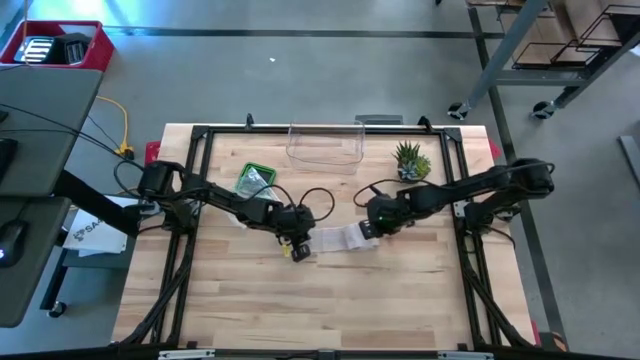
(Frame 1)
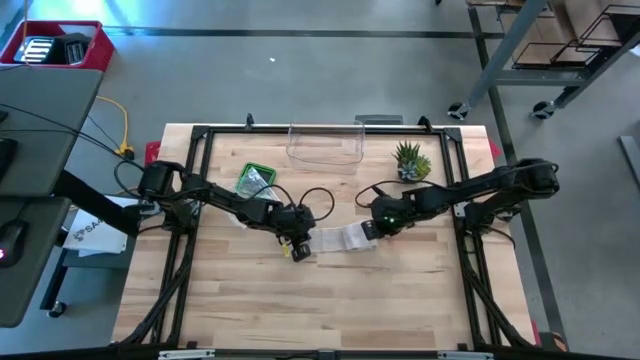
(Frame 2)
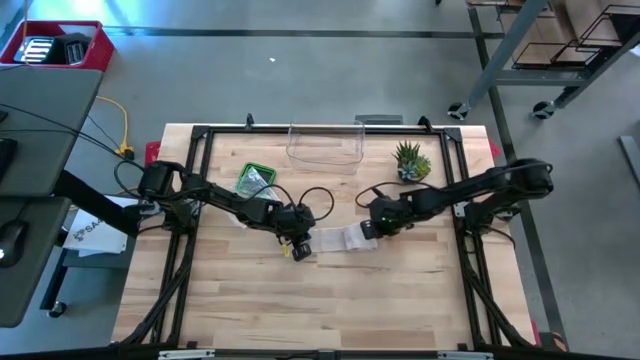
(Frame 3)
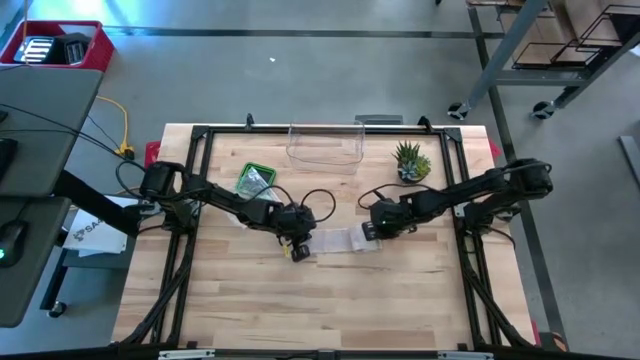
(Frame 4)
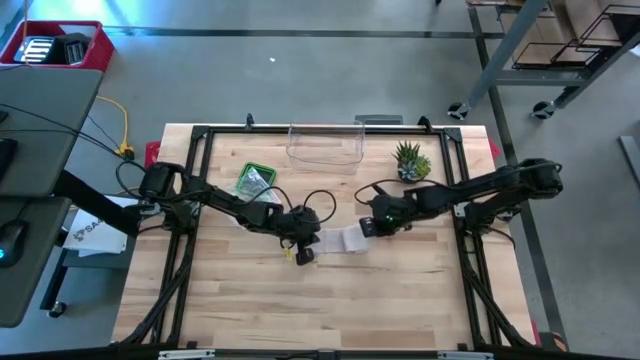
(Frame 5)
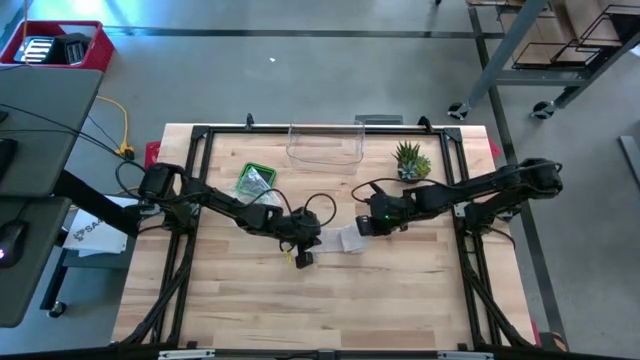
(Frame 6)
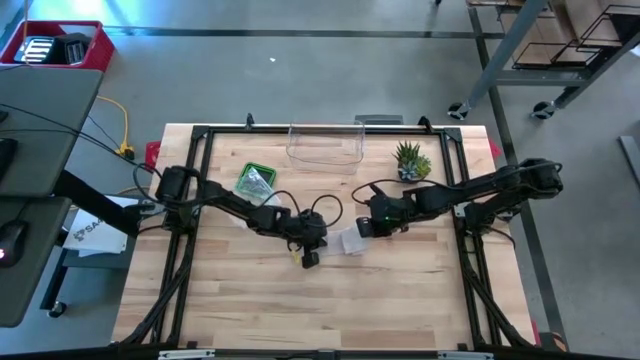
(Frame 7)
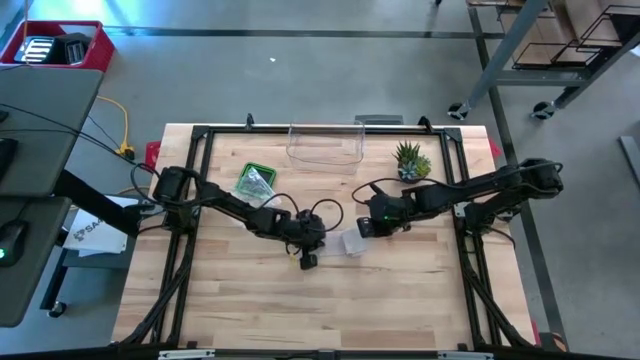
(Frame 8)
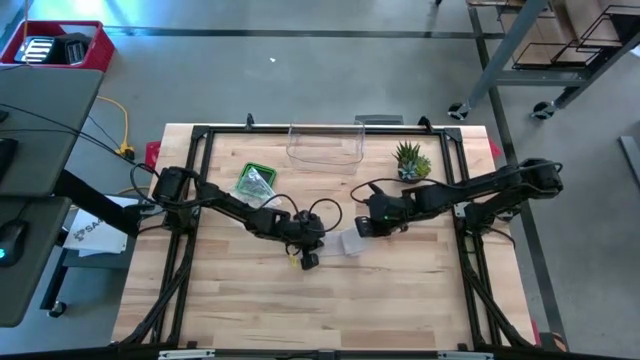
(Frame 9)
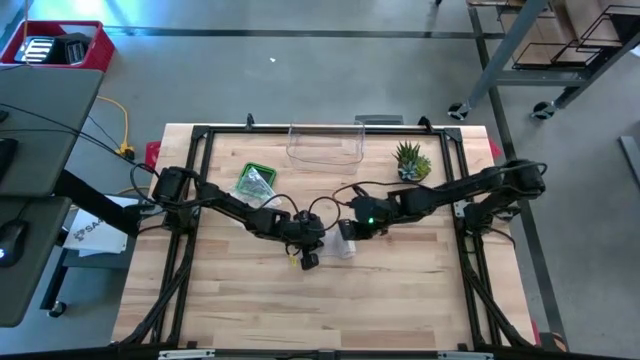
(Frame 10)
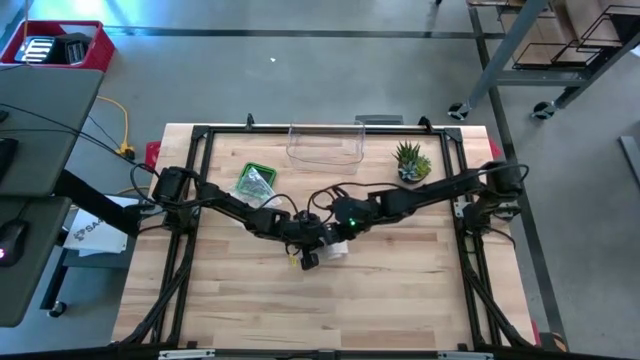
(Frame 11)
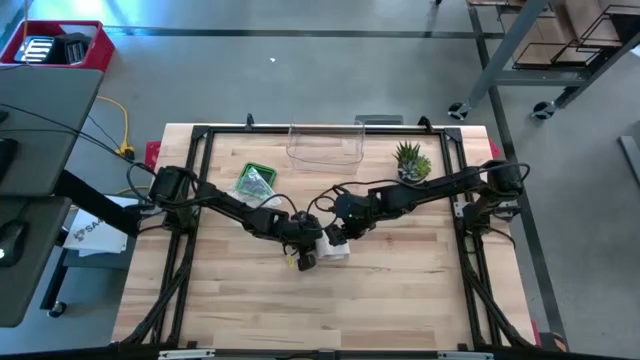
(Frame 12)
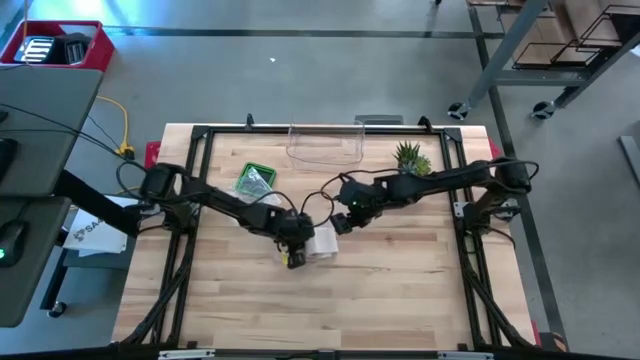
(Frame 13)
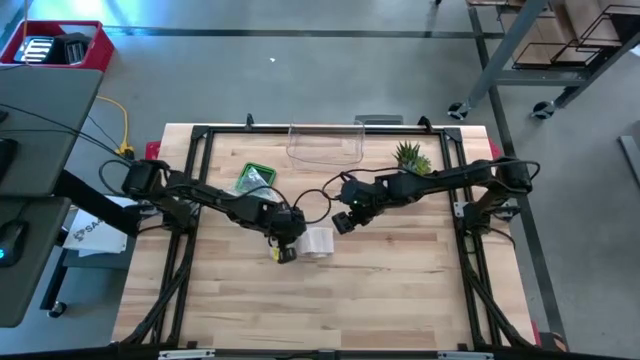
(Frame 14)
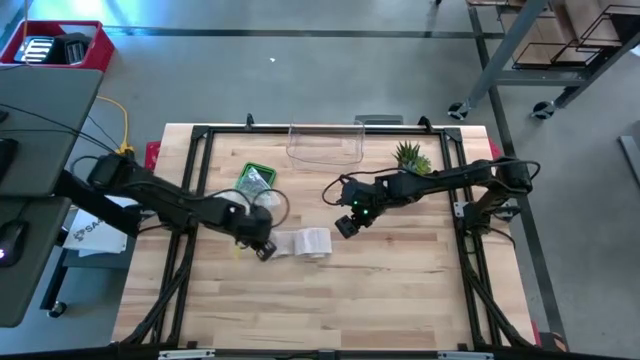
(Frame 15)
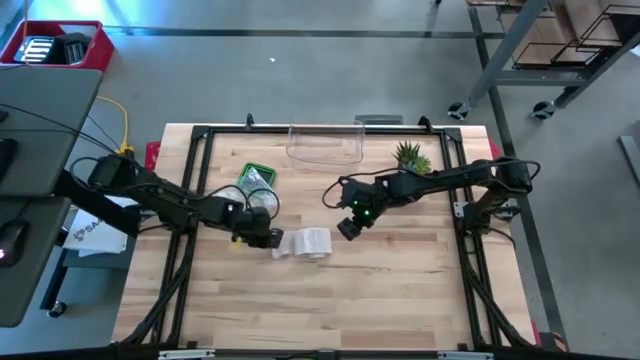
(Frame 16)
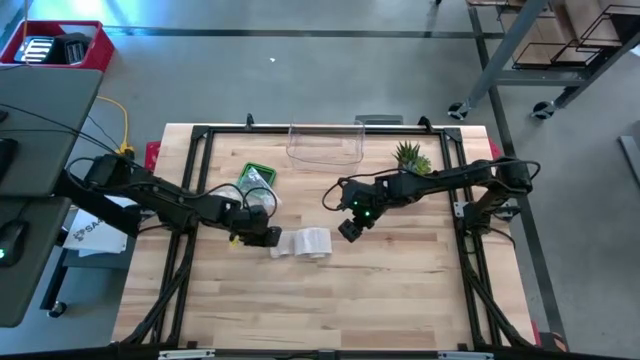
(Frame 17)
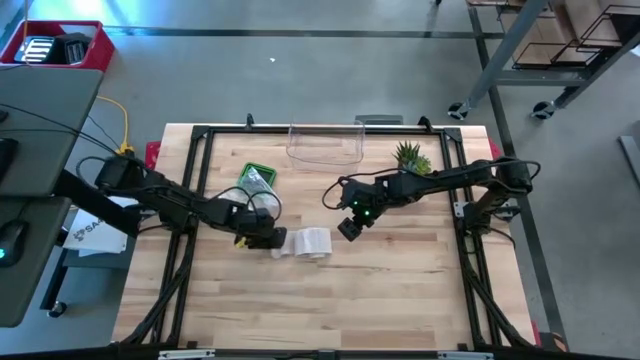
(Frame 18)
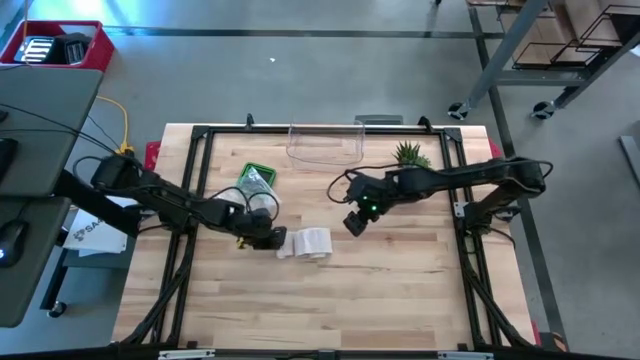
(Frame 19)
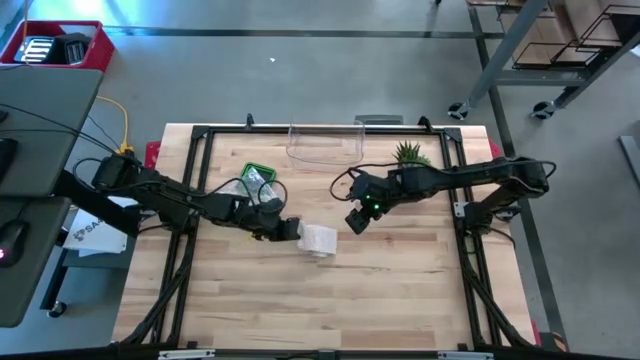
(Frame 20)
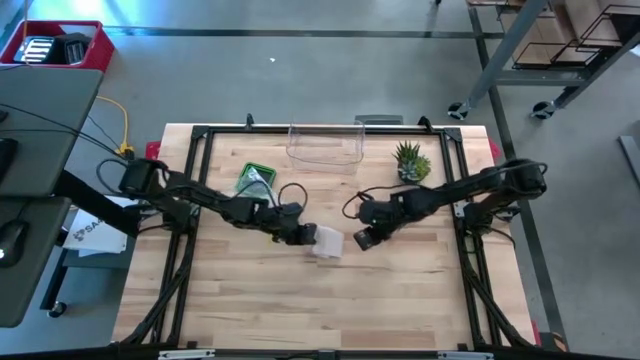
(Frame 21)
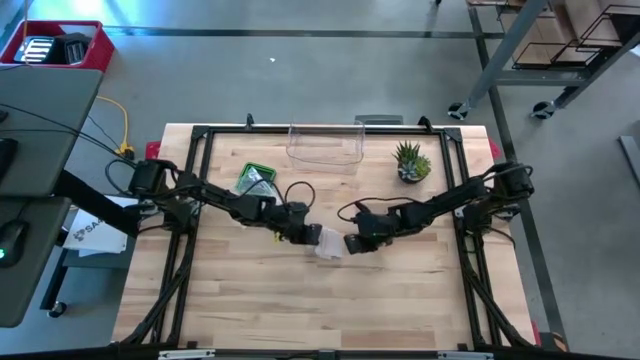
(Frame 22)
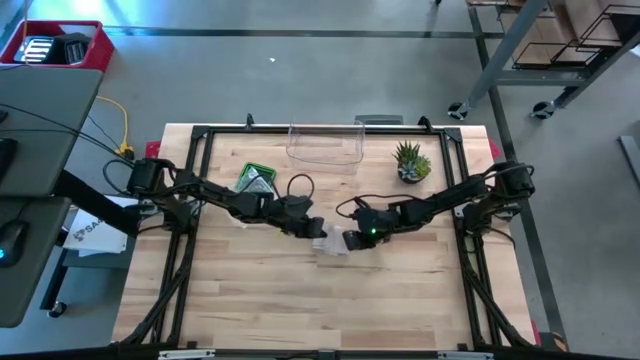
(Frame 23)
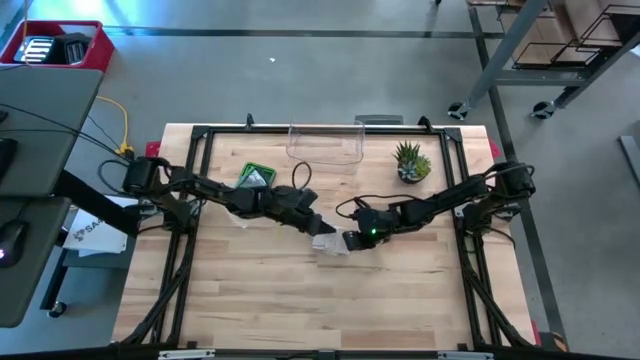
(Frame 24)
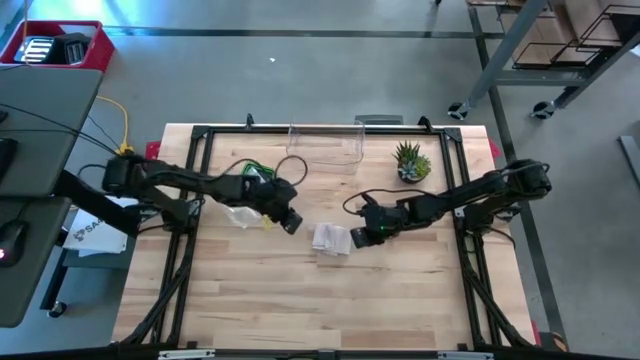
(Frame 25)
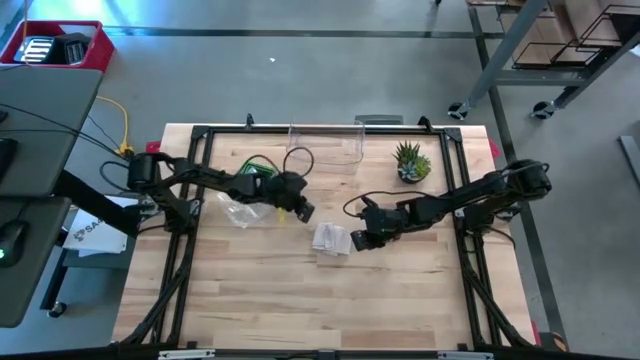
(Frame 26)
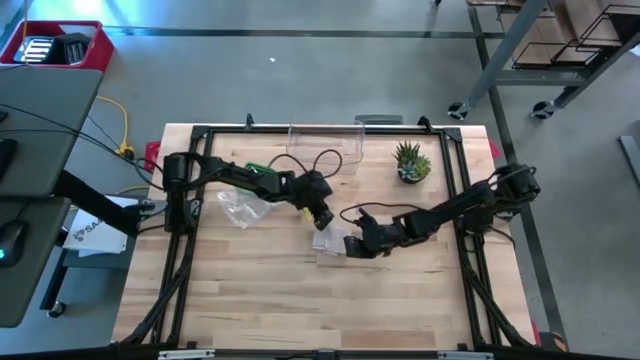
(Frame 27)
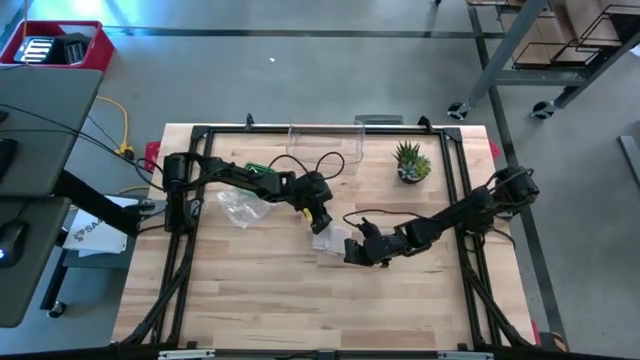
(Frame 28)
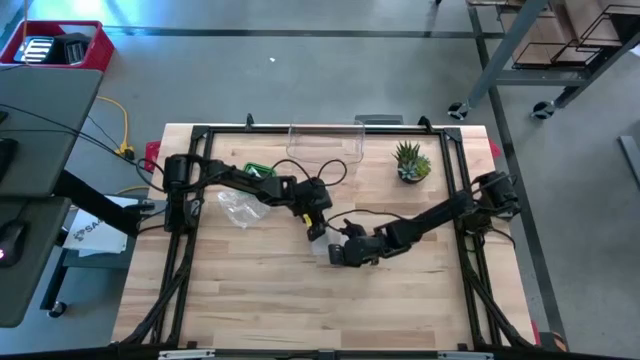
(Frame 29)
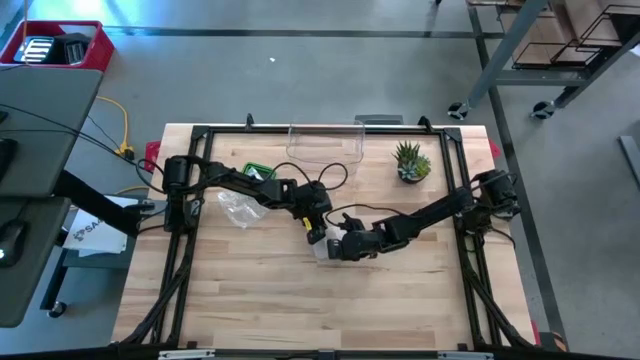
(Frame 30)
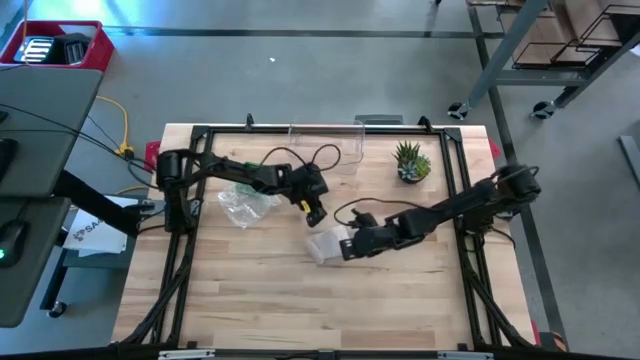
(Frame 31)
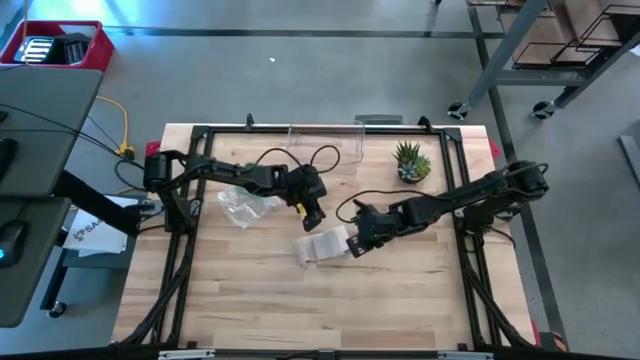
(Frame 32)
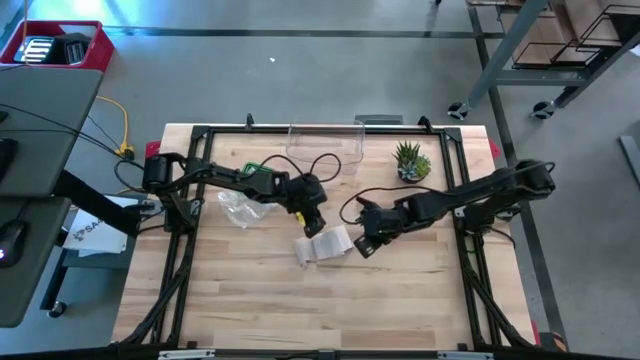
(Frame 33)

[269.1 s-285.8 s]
Task: Roll bandage
Roll the bandage

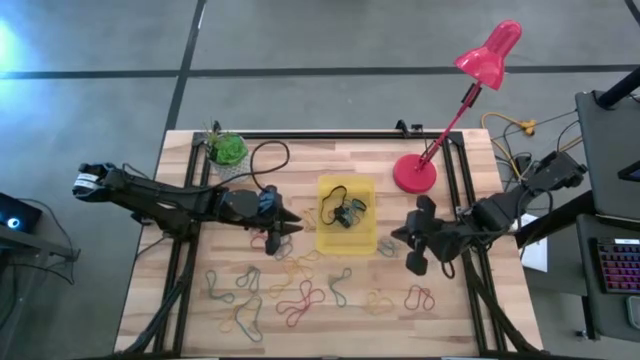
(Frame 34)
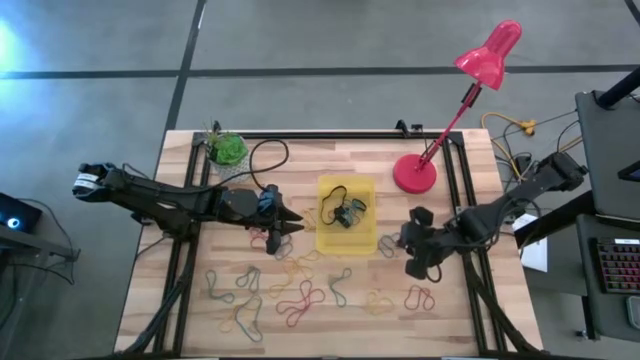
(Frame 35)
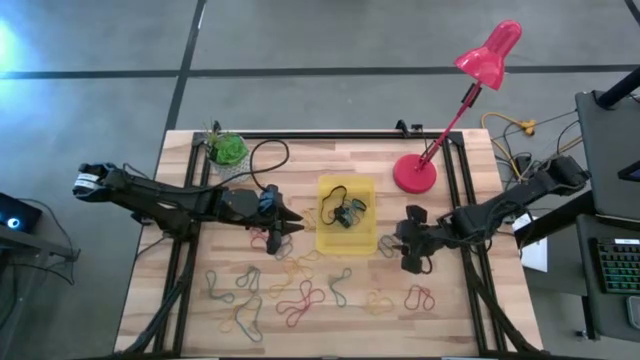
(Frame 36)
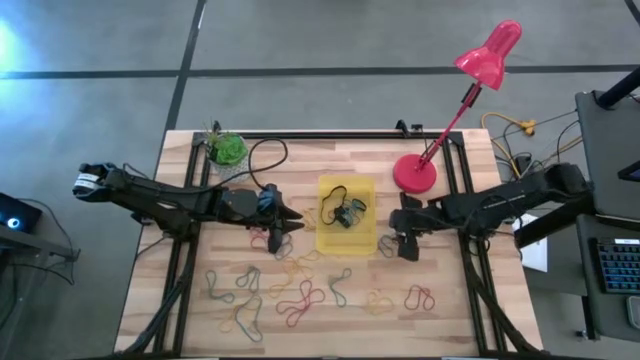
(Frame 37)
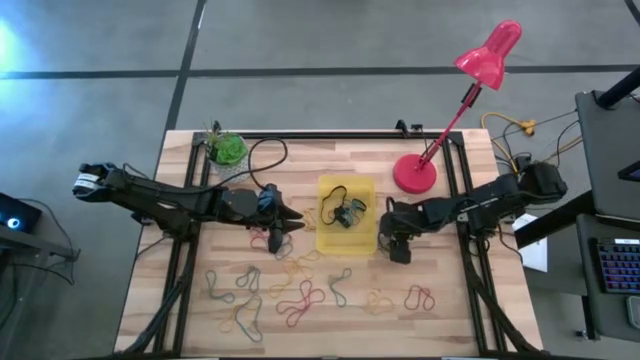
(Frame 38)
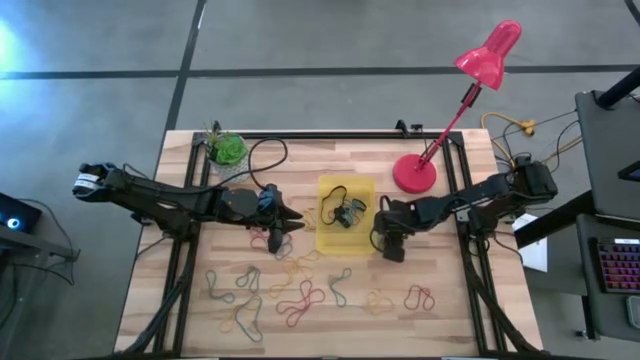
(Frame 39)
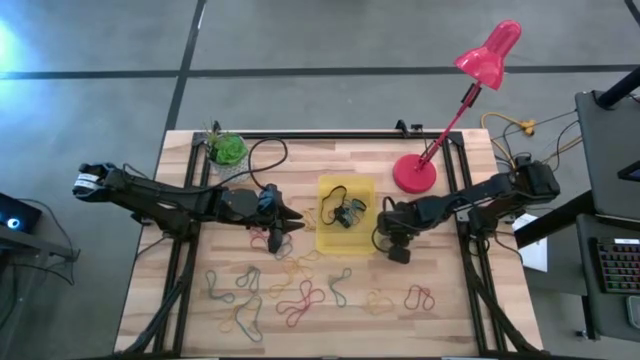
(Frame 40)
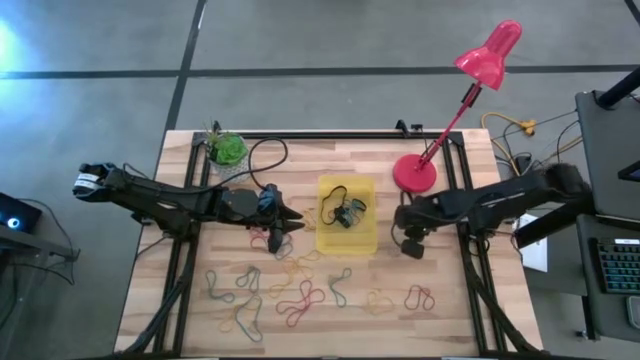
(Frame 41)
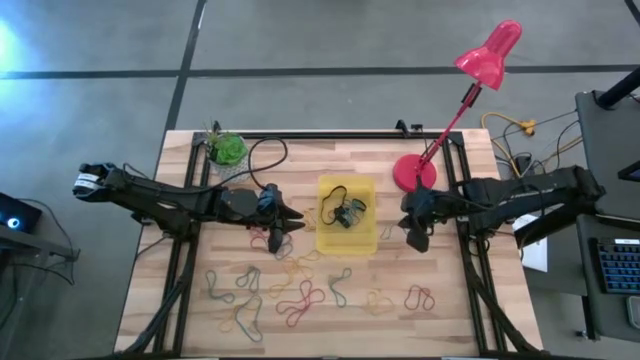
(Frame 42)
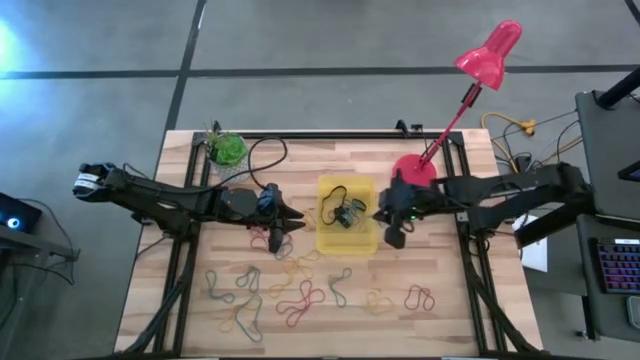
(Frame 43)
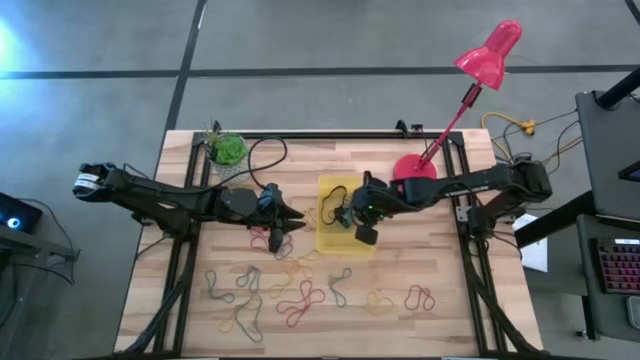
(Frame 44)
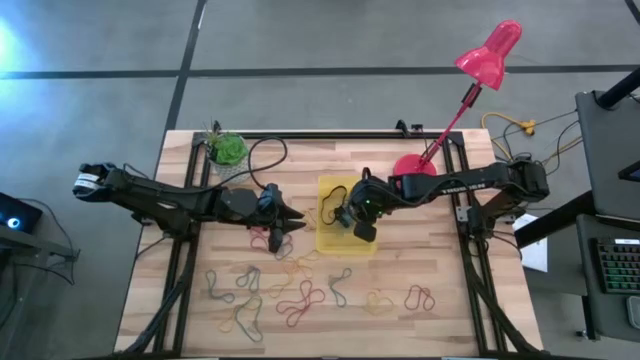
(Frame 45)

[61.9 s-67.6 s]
Task: Pick and place rubber bands into bin
Put the blue rubber band into the bin
